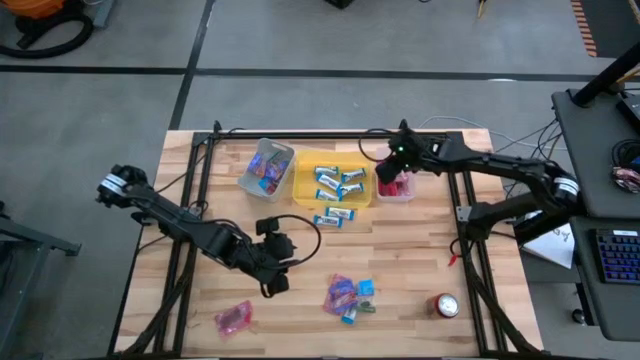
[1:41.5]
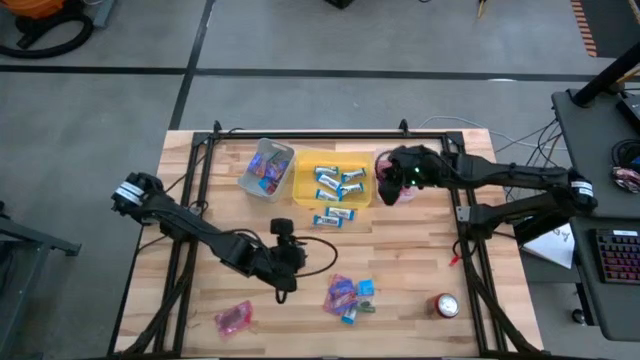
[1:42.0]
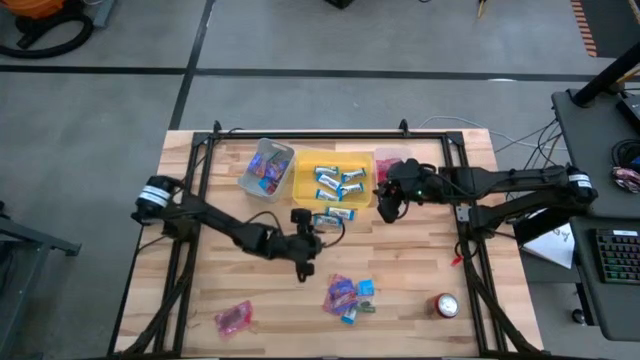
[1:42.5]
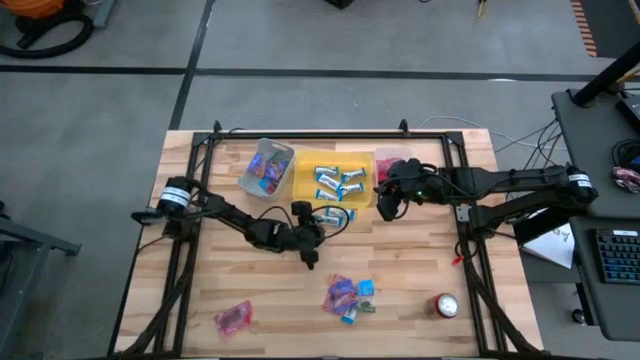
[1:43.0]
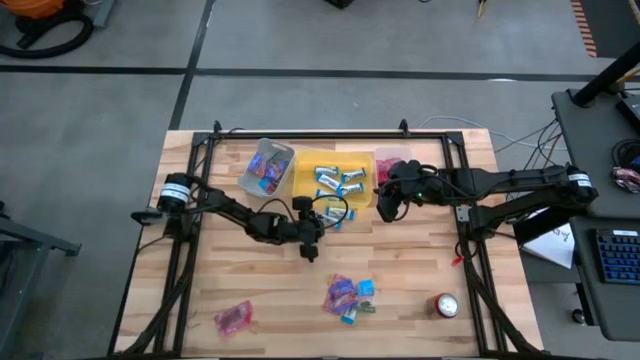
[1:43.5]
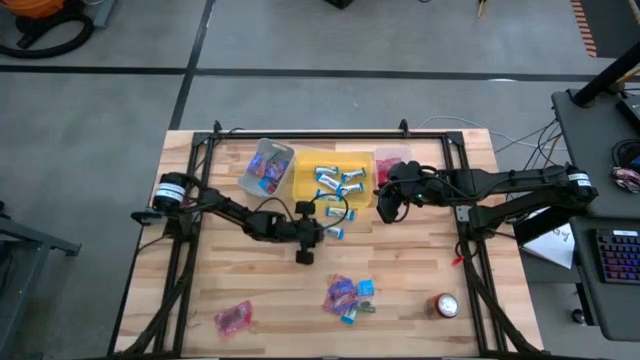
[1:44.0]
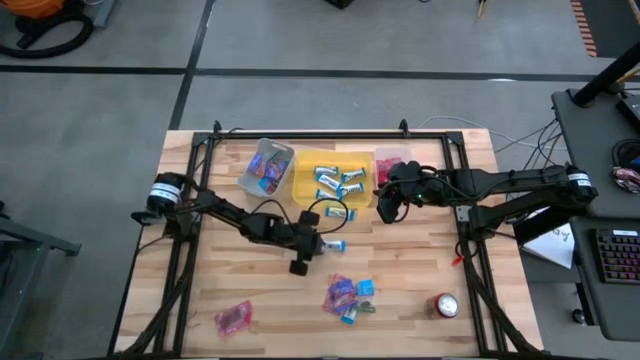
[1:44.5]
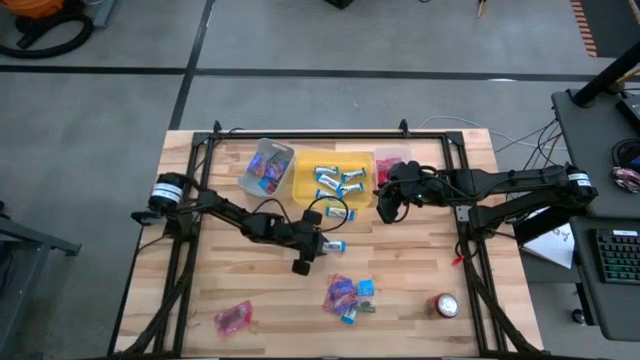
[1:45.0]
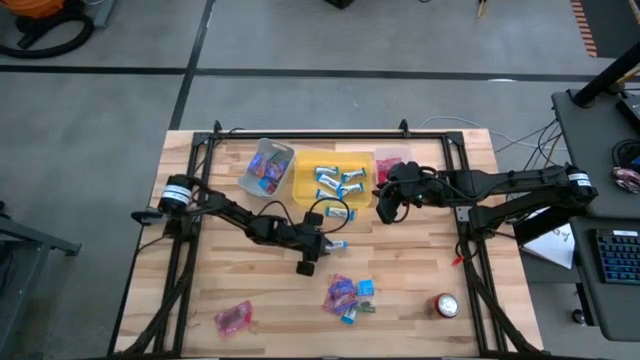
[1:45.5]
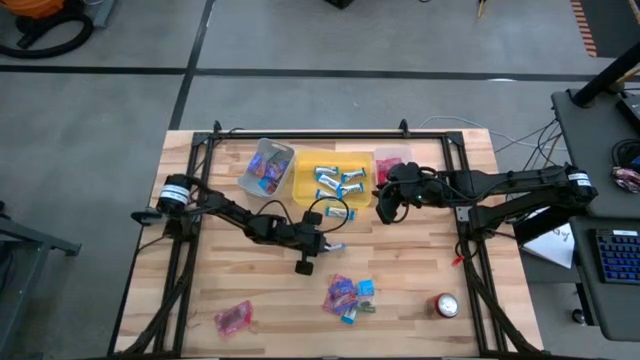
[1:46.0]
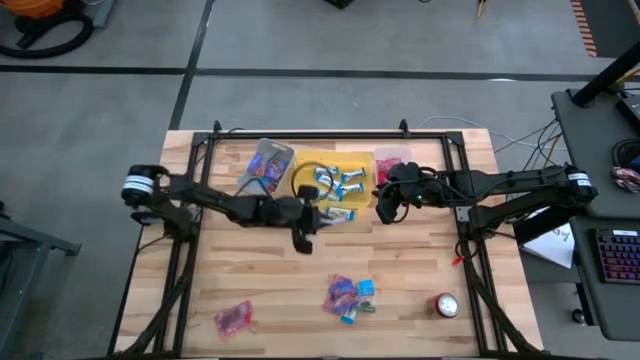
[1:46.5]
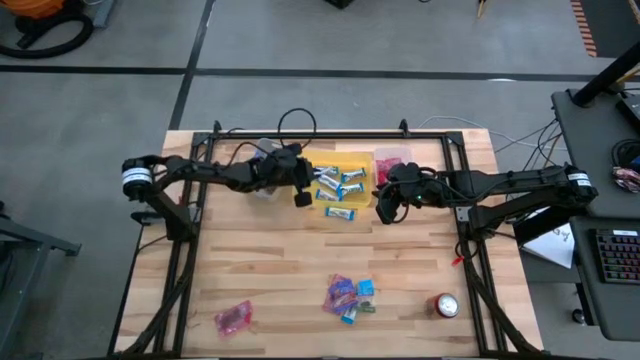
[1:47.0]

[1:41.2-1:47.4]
Task: Sort candy
Put the white chocolate into the yellow bin

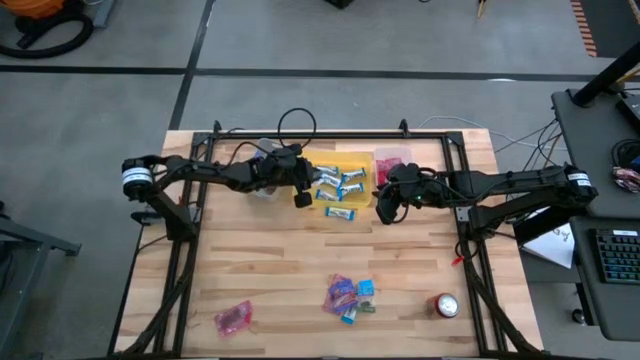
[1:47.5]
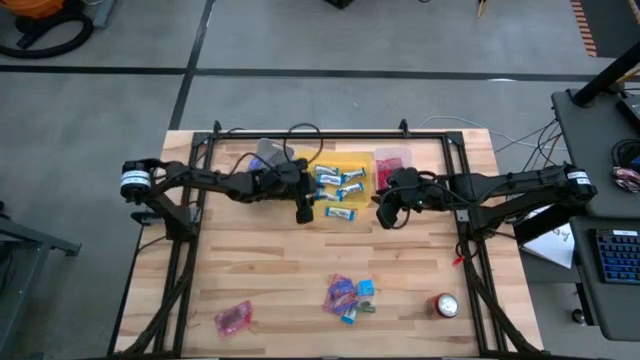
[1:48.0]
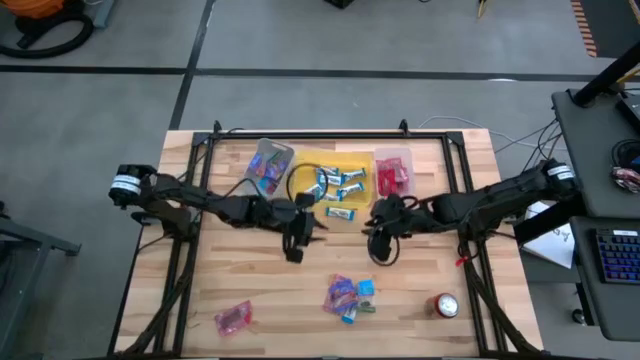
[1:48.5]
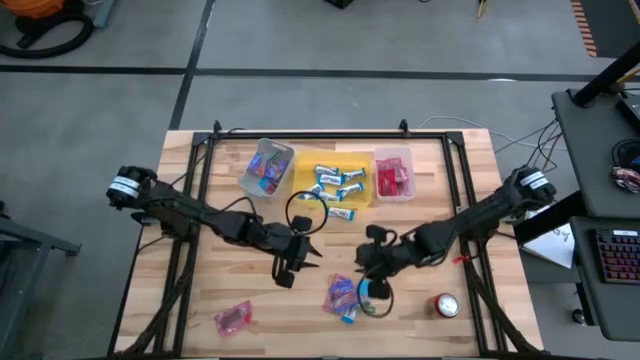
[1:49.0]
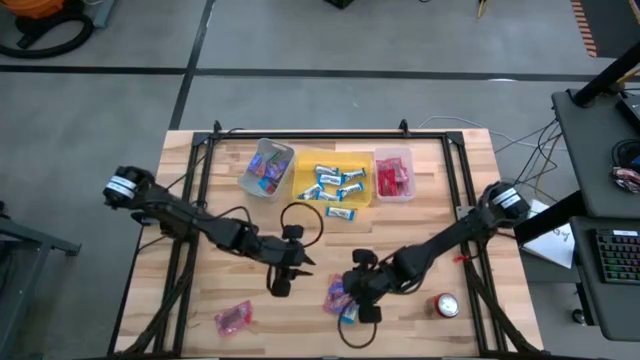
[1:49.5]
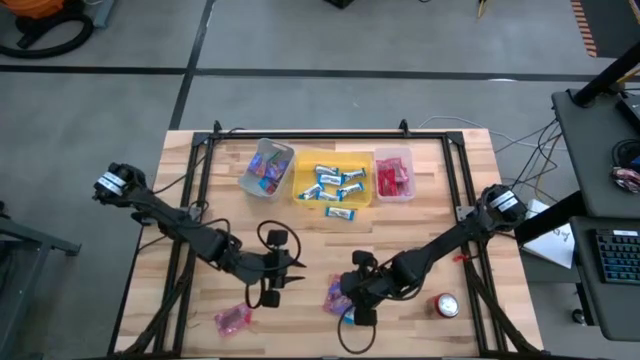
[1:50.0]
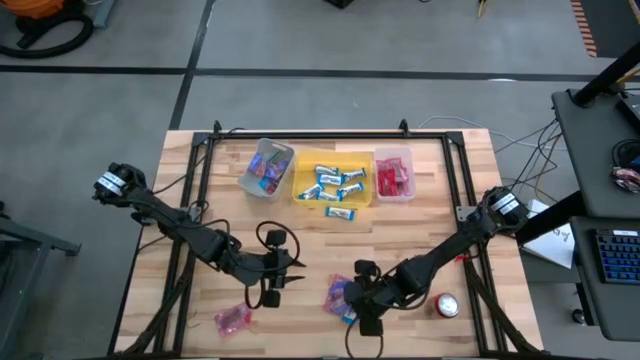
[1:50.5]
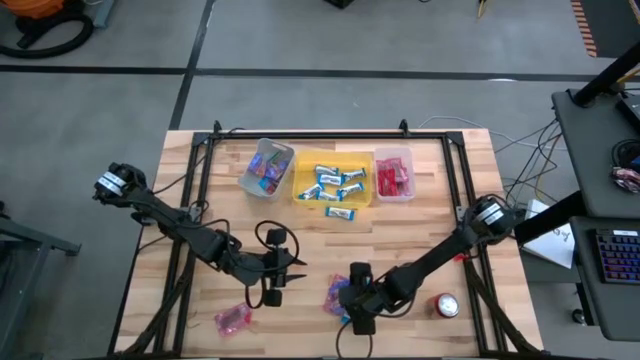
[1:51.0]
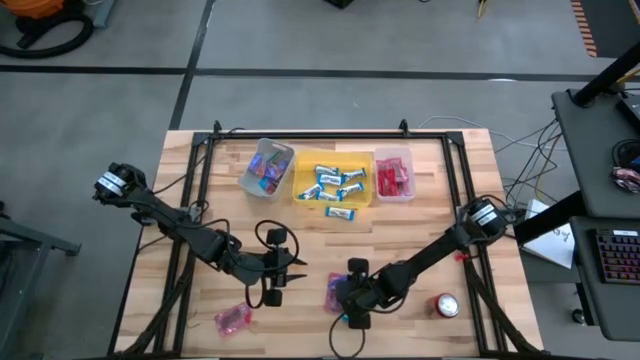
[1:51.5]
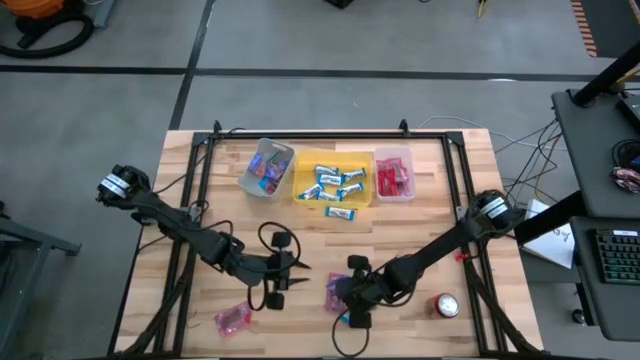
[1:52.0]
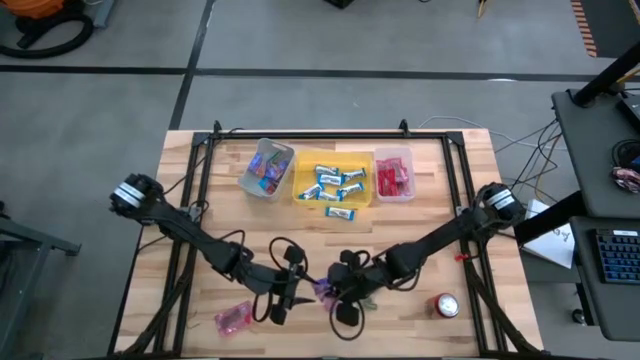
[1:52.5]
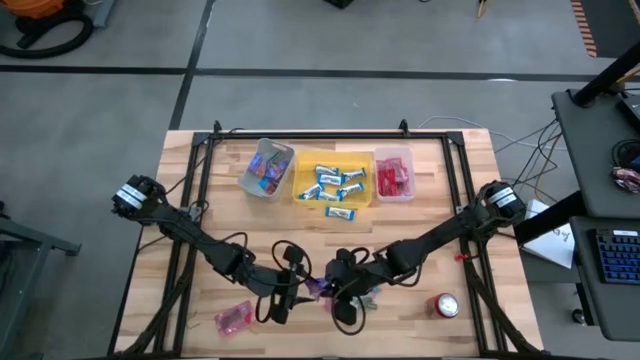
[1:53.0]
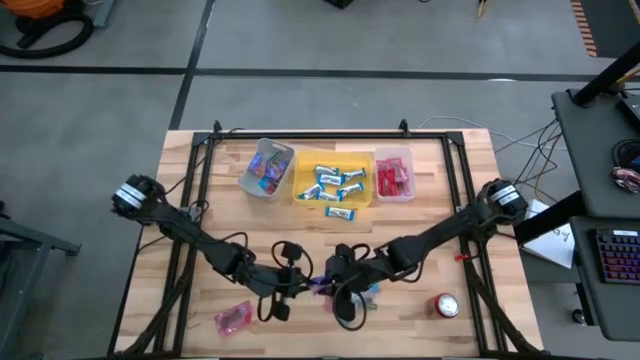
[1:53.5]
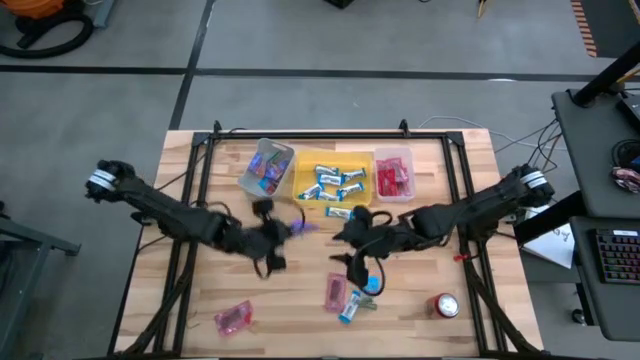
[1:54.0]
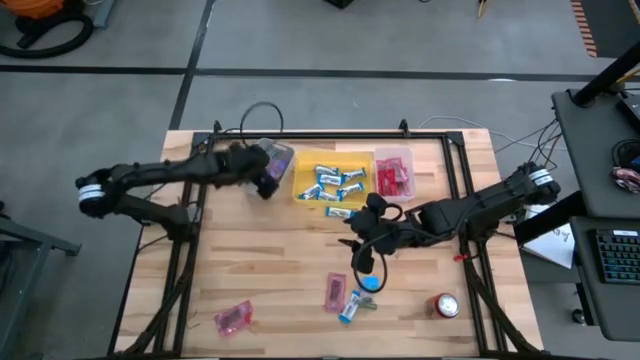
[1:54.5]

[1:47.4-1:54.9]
Put the blue candy into the gray bin

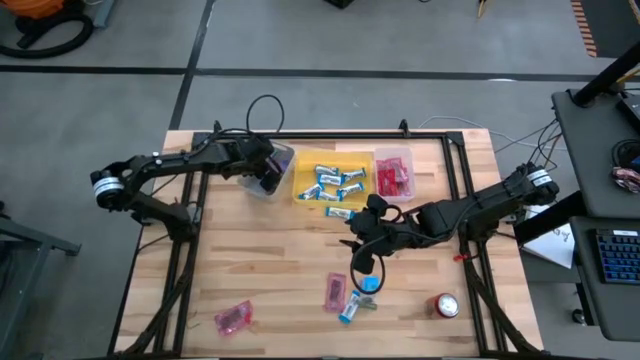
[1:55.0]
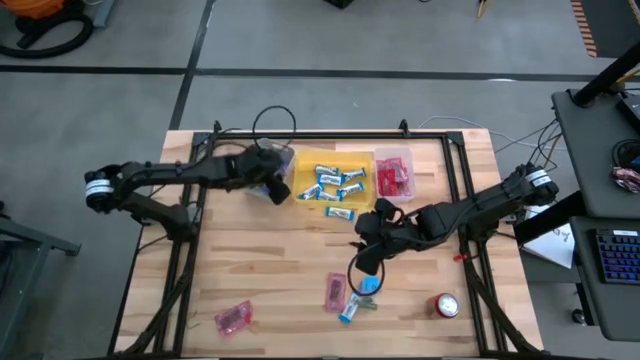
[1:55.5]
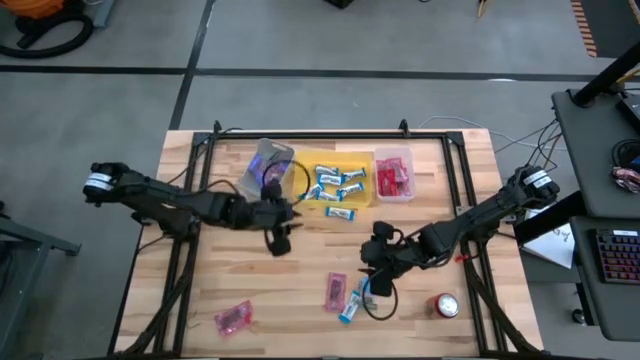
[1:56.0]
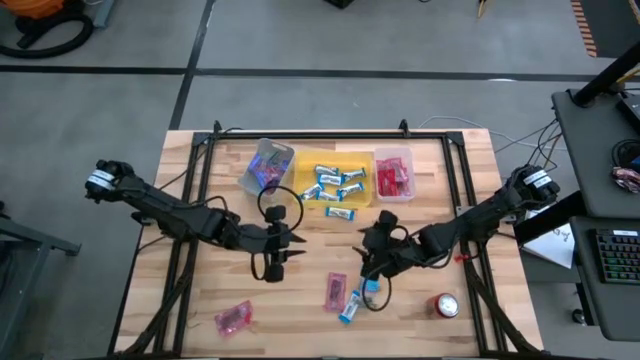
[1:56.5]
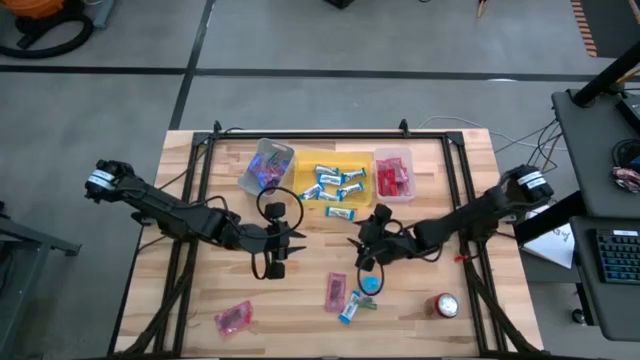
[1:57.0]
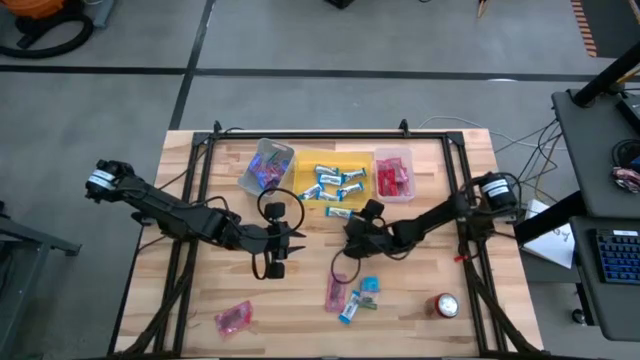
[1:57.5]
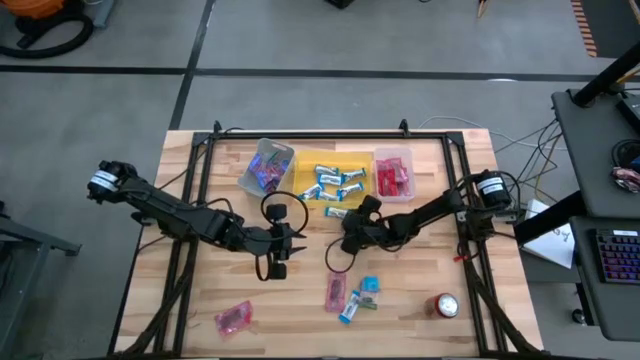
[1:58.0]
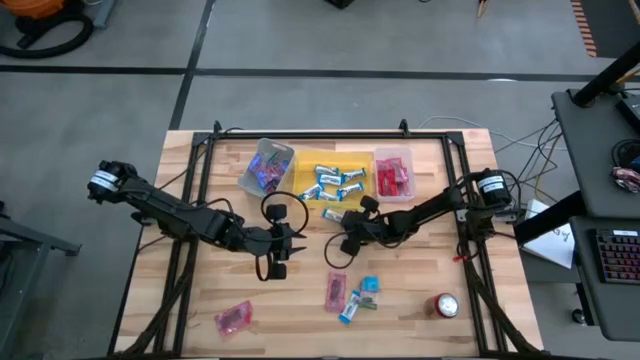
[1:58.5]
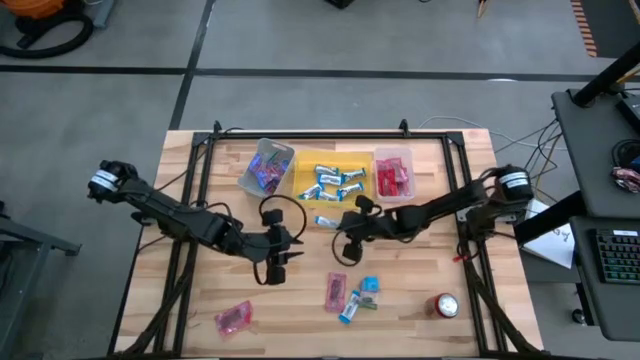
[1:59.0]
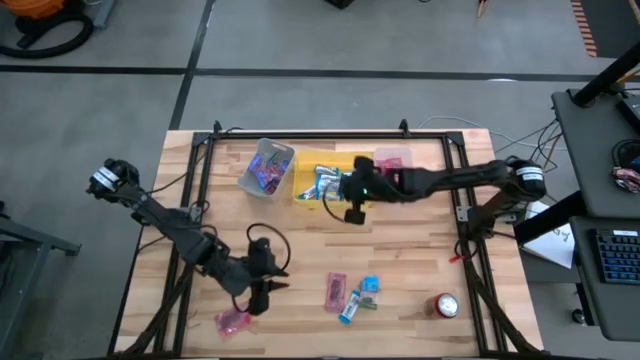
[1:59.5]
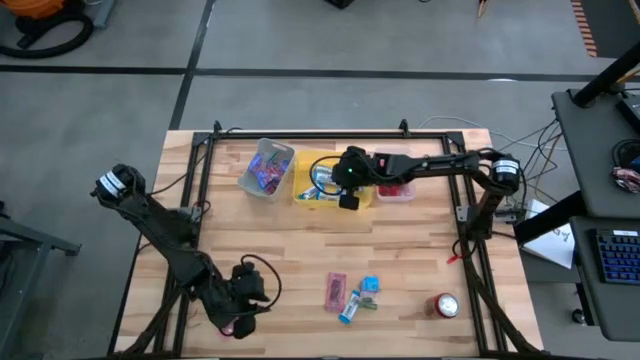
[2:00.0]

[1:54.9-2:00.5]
Put the white chocolate into the yellow bin

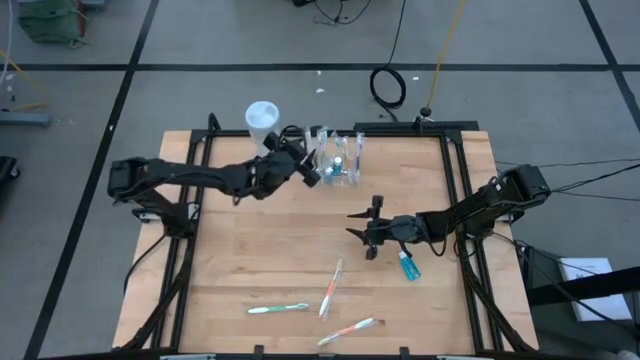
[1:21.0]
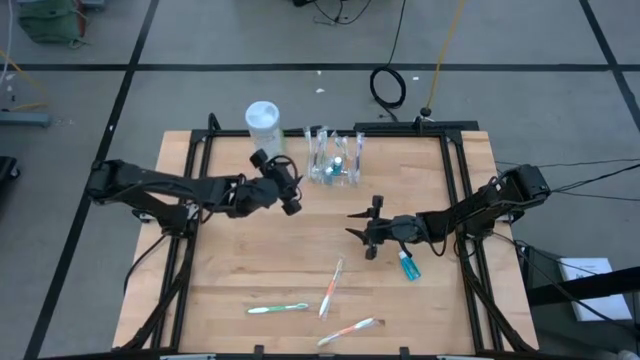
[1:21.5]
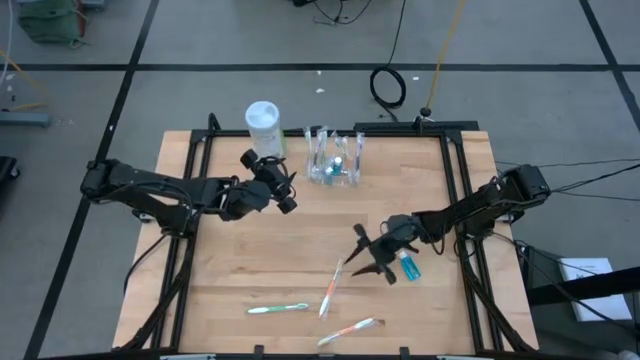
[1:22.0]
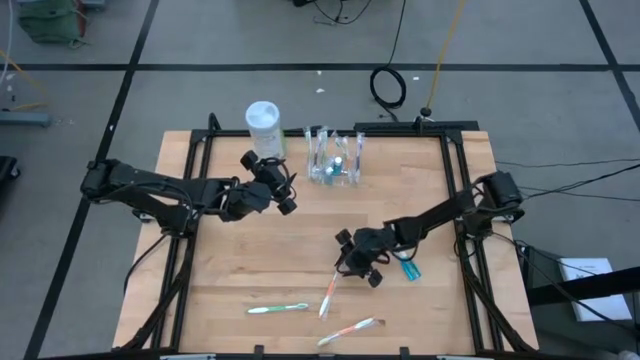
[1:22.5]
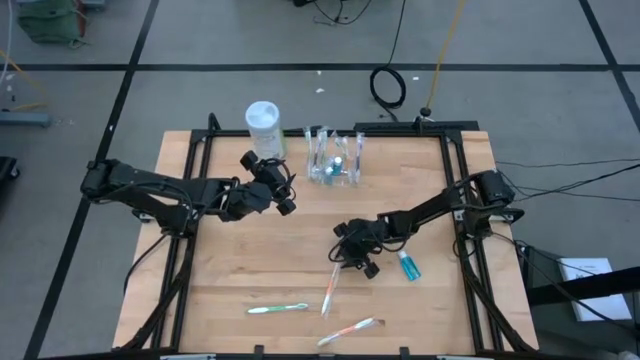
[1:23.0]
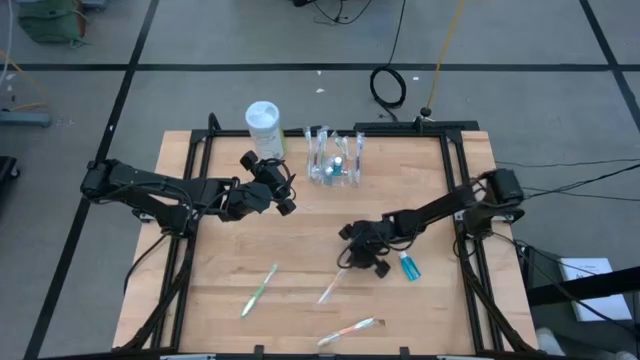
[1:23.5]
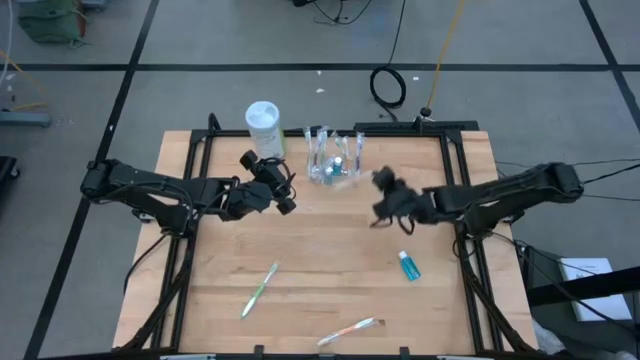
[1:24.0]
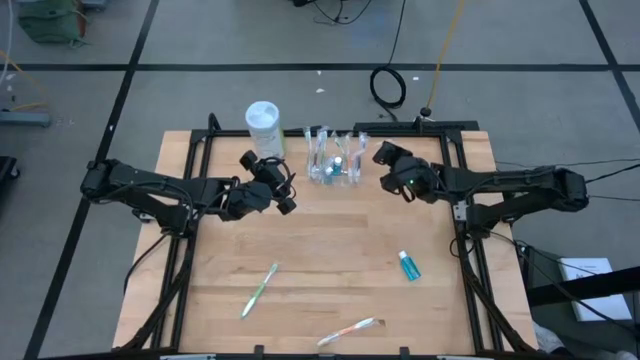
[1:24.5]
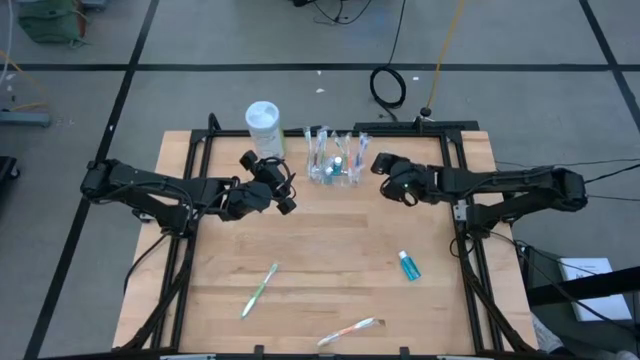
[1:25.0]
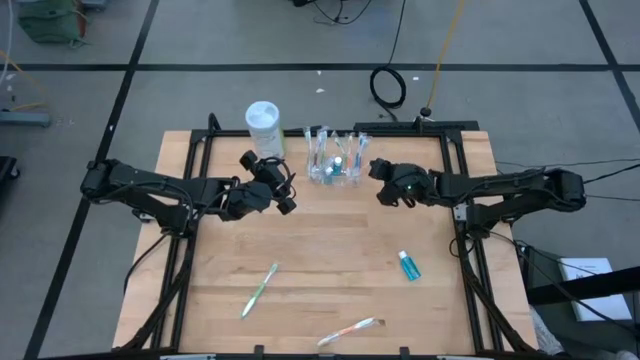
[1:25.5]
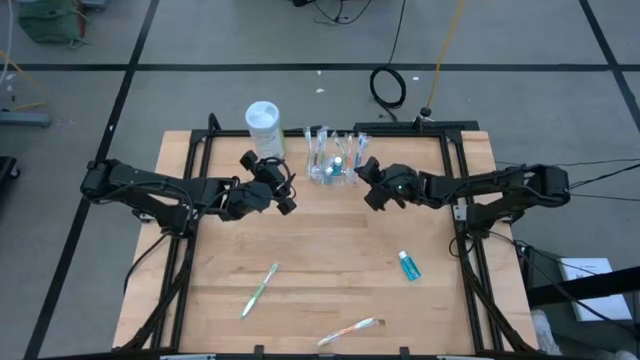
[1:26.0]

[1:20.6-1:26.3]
Task: Pick & Place toothbrushing station
Put the orange toothbrush into the transparent organizer
